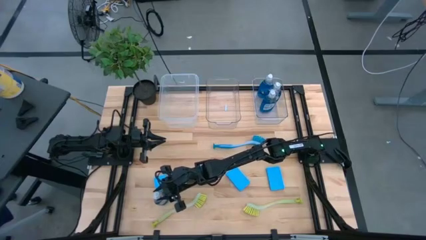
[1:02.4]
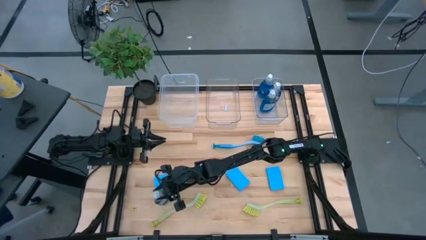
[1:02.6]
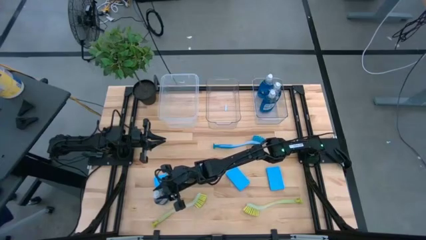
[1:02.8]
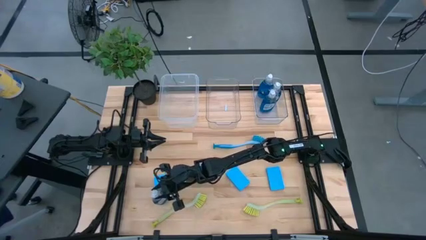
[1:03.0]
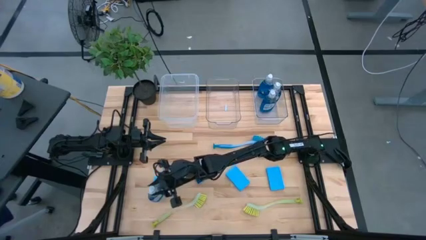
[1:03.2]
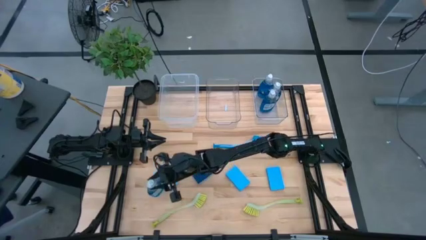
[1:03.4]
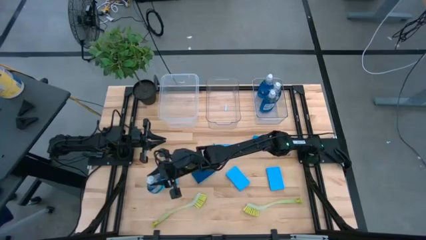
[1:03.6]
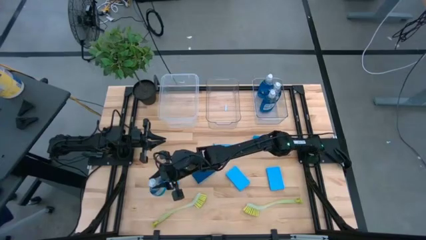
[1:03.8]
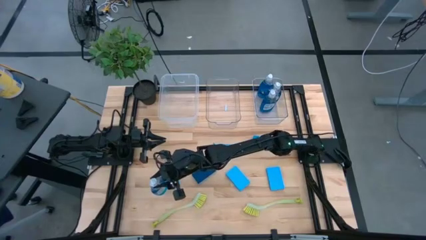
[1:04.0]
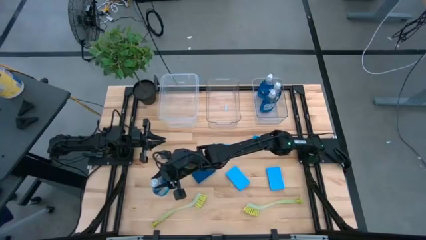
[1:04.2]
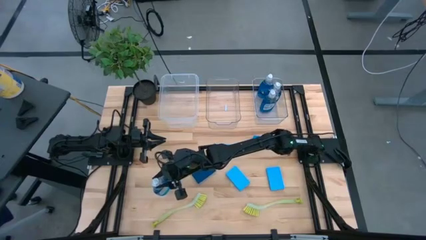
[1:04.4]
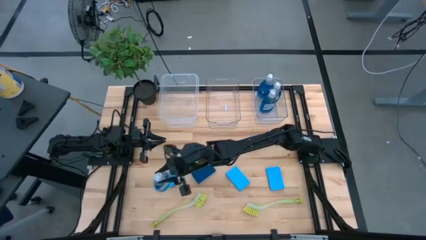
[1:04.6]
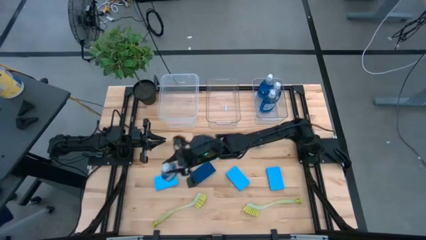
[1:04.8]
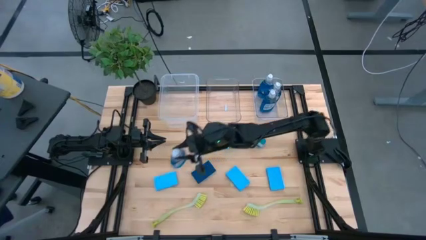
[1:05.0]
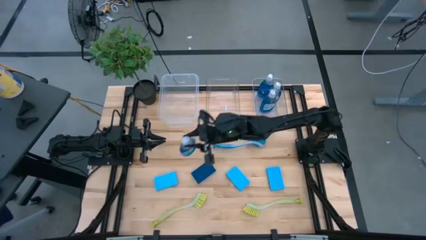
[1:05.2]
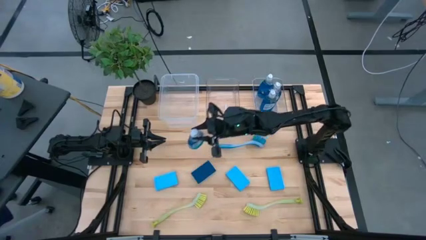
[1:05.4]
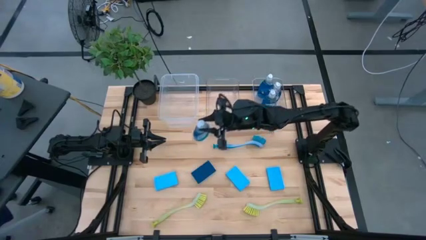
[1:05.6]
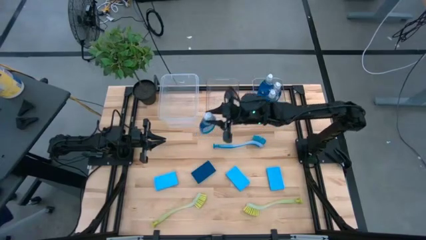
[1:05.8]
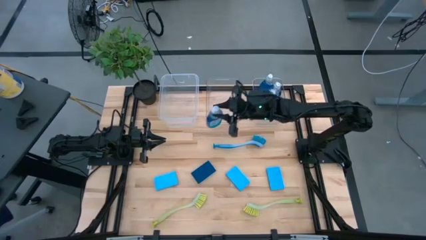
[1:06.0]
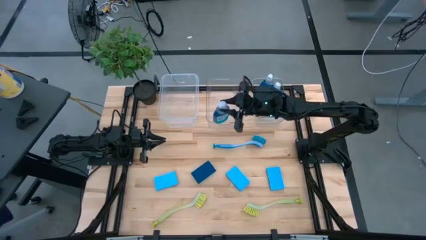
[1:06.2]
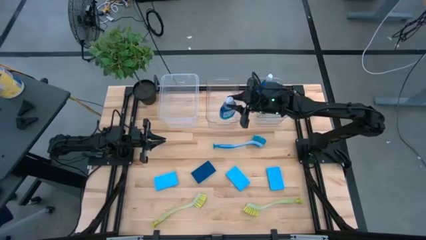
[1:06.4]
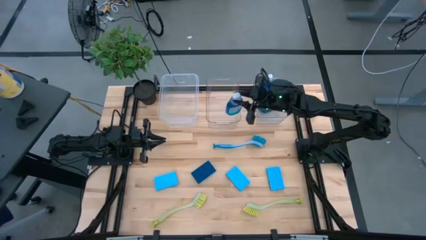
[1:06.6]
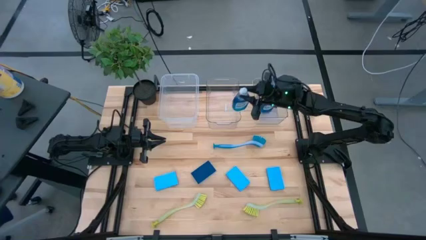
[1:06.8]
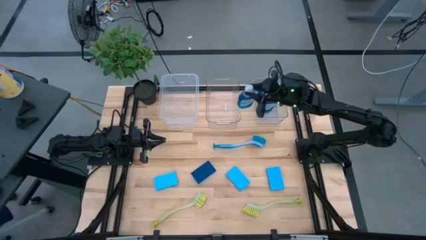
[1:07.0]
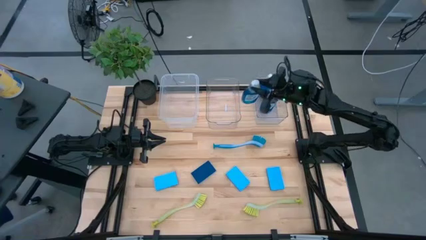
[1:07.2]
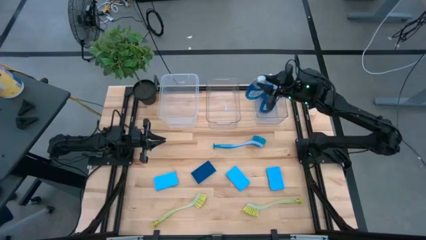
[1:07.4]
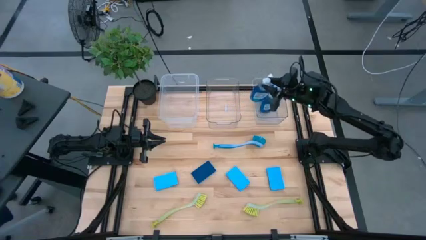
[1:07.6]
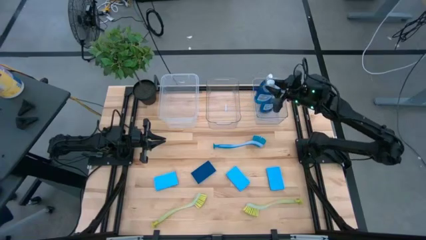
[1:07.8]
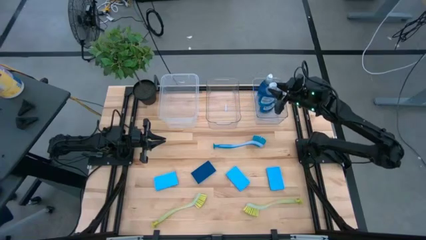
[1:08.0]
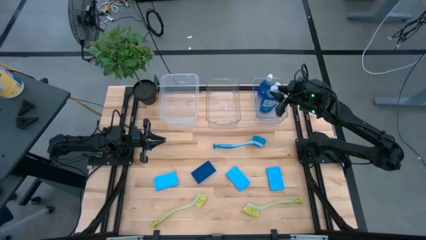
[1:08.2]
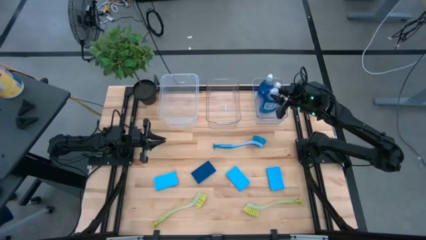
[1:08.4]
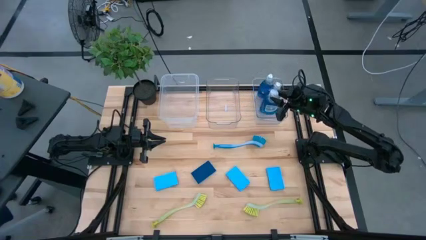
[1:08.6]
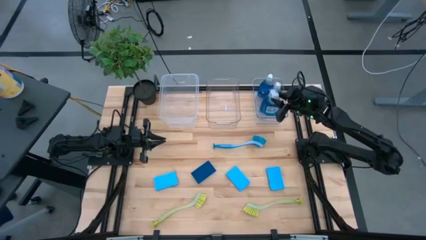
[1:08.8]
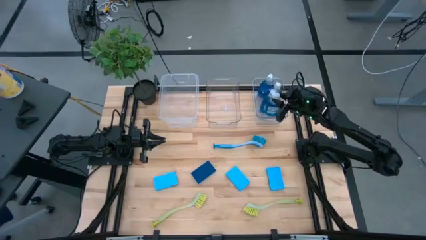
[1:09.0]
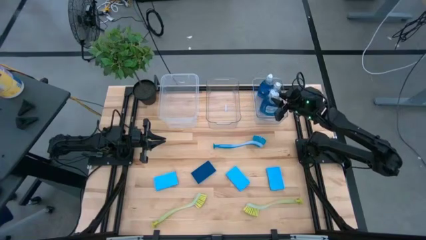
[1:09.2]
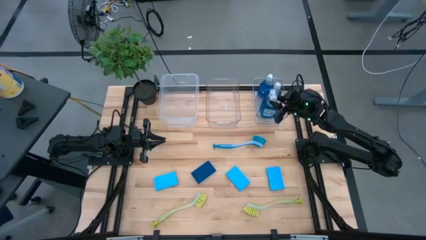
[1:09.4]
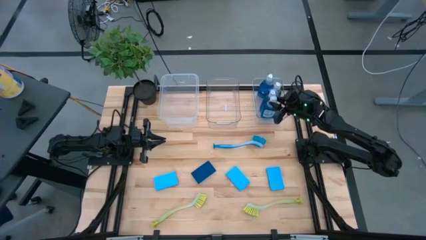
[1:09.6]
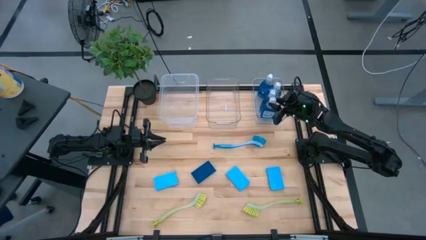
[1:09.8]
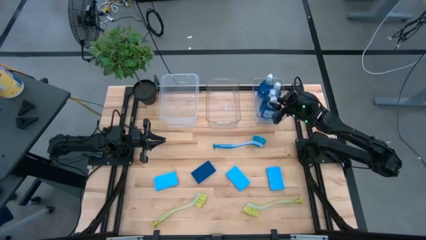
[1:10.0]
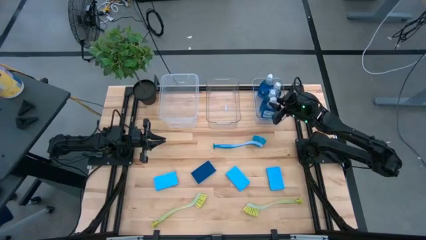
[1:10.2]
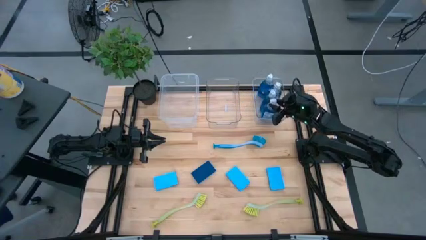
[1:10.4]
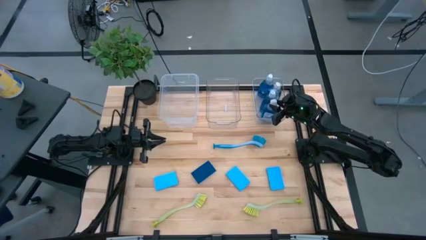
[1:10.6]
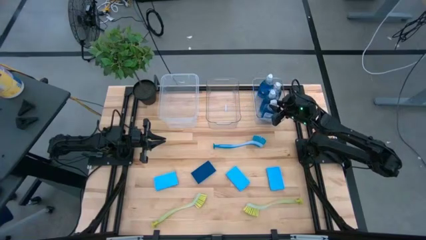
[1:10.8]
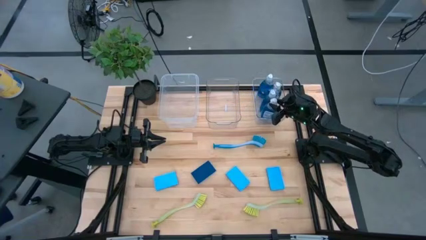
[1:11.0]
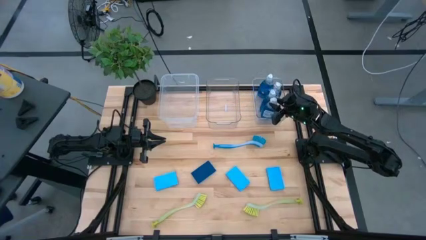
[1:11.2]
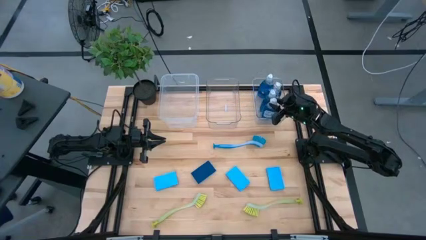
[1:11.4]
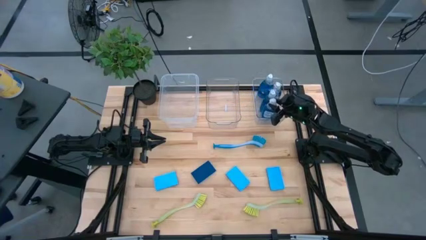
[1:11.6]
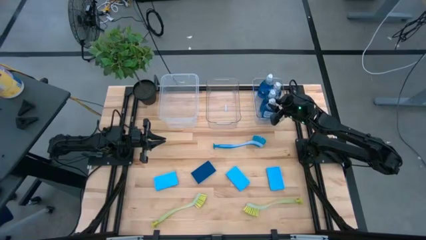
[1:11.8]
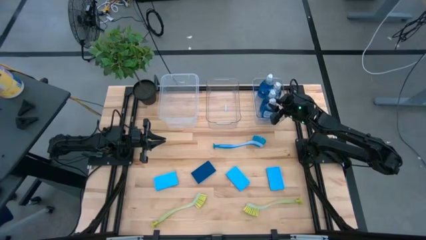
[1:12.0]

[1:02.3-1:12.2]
Task: Pick & Place Kitchen Sink Supplies
Put the blue detergent into the right transparent bin

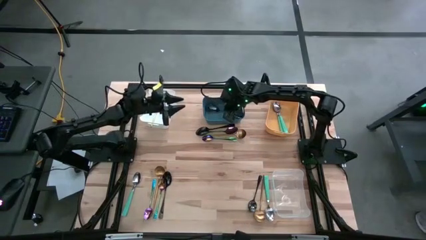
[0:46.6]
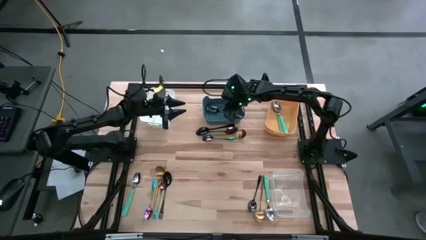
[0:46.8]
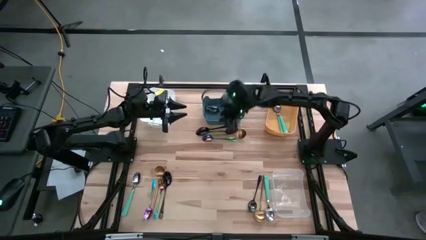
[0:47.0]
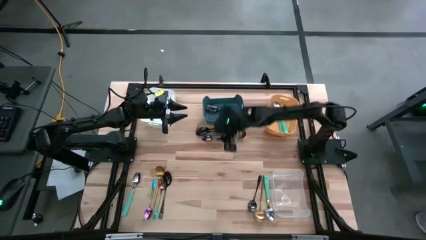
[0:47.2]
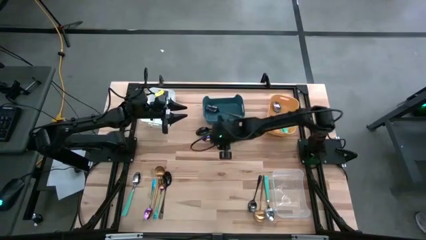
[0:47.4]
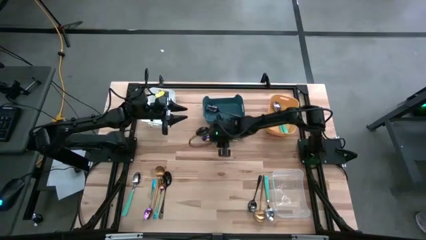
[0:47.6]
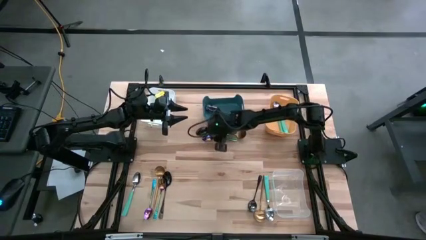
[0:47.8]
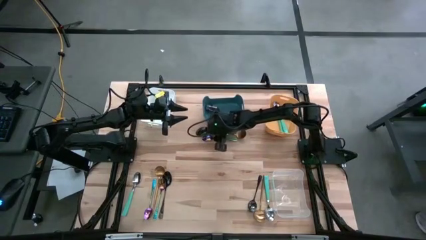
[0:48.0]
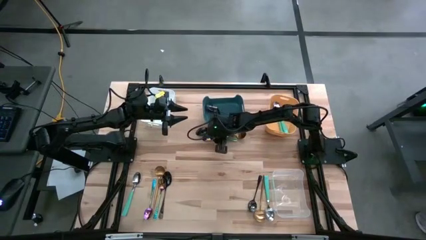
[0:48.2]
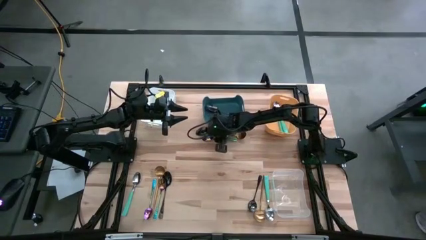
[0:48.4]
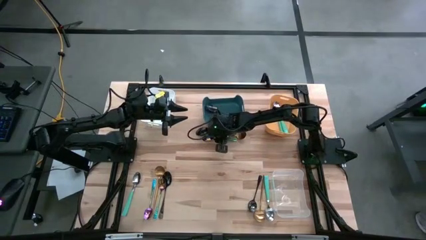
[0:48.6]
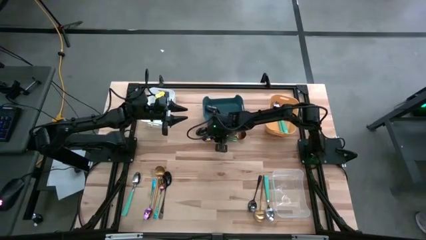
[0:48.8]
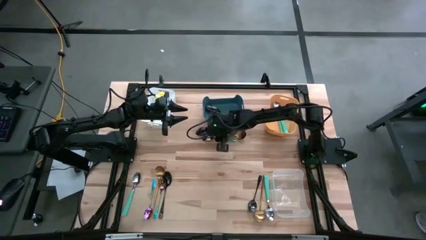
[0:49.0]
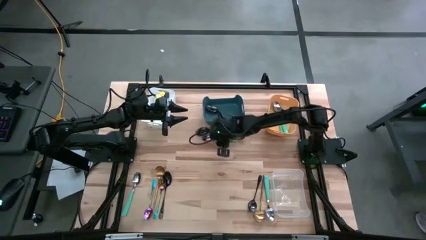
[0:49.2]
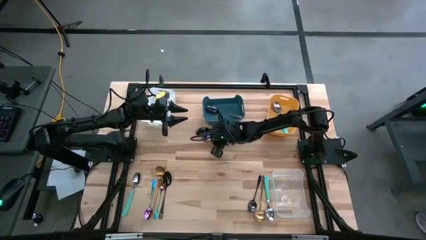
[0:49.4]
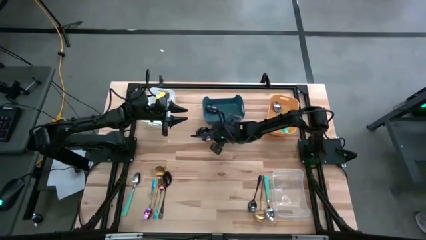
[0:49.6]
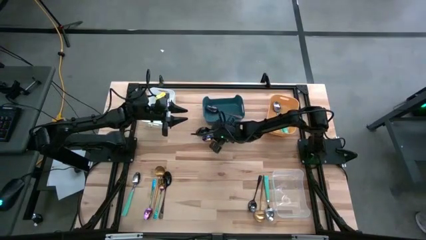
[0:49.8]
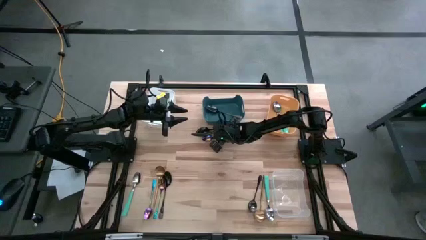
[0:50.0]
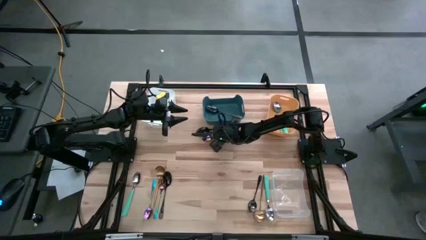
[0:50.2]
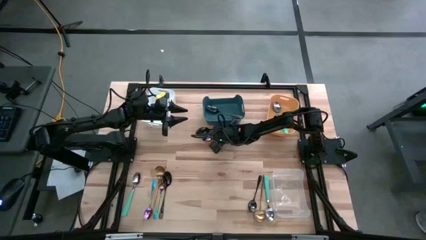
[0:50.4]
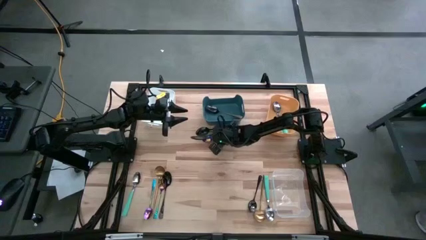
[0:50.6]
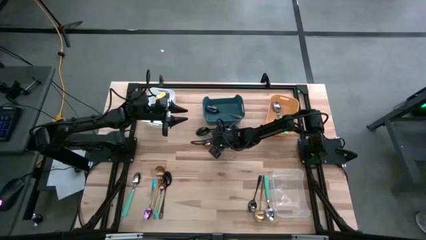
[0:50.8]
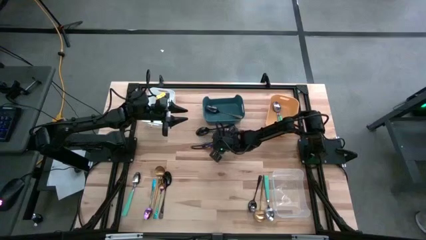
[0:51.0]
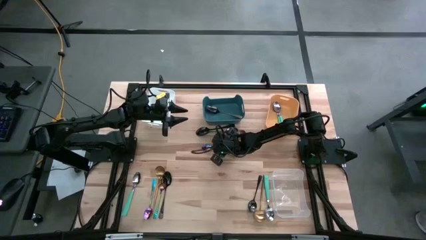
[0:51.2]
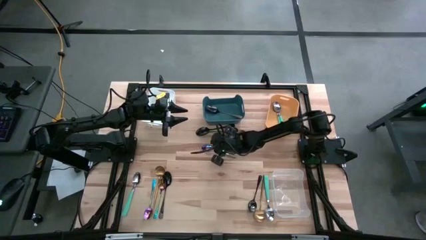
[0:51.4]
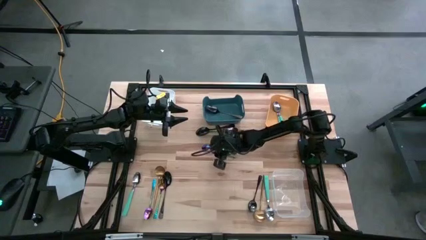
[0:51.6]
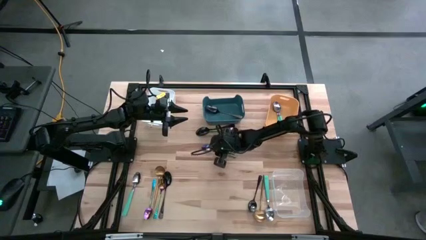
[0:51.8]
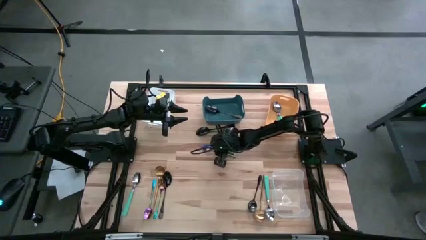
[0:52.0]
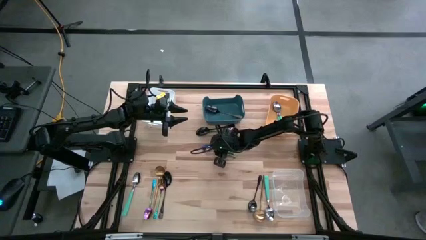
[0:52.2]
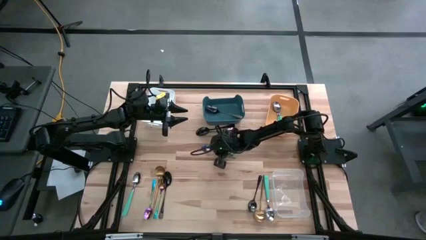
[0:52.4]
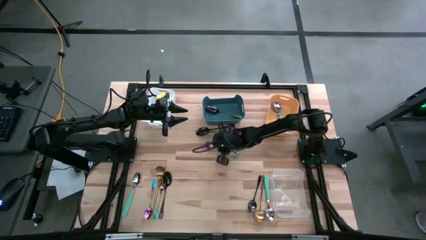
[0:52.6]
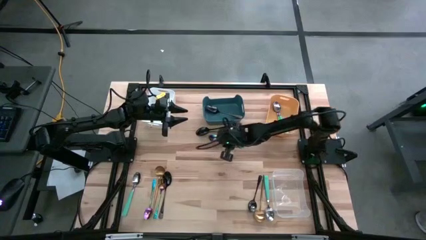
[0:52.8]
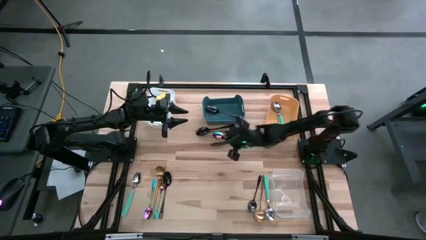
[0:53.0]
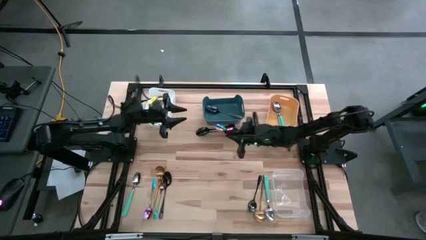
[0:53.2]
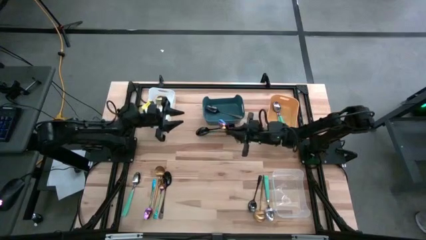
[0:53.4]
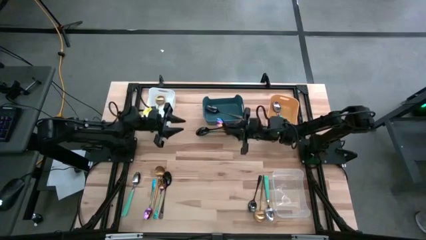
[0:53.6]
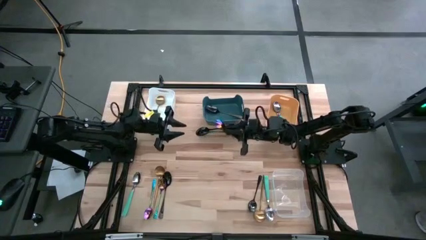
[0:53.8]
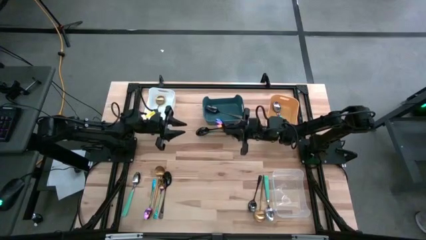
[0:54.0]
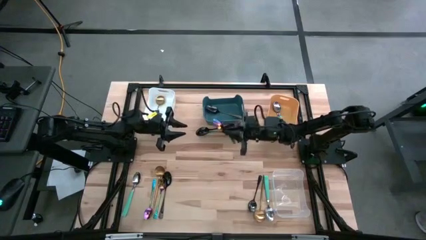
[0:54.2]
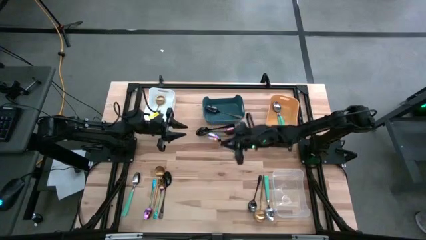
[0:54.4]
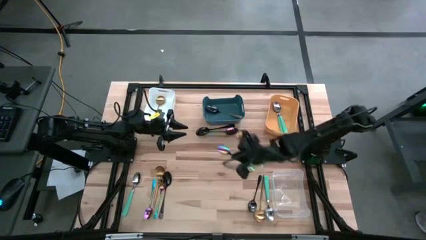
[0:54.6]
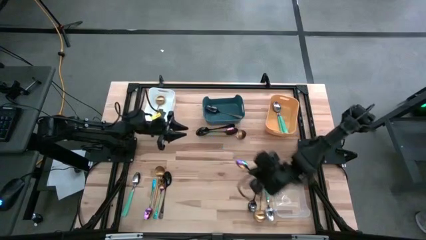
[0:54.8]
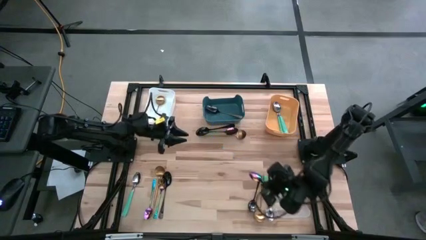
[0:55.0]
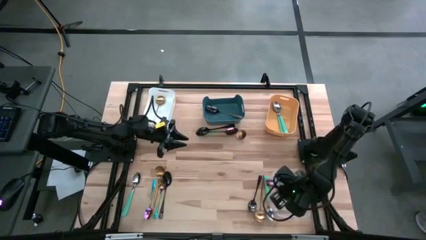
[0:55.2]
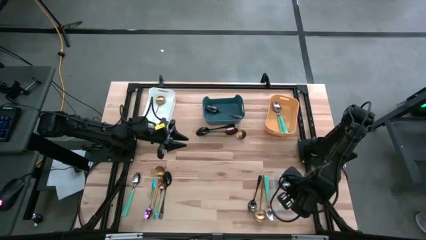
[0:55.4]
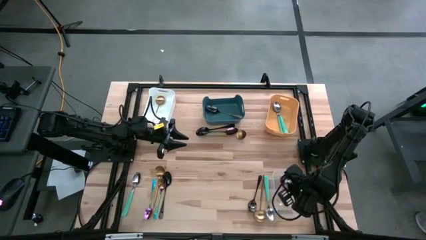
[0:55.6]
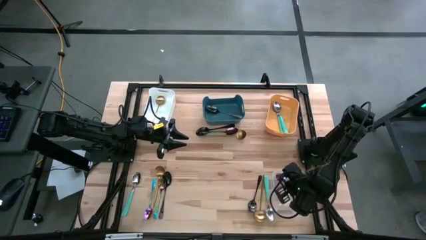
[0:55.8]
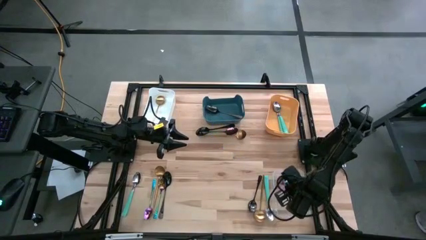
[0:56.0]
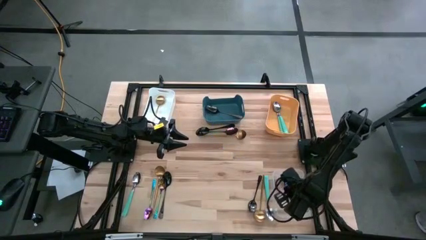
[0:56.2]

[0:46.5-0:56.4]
Task: Sort silverware by color (type)
Put the purple spoon into the transparent bin
